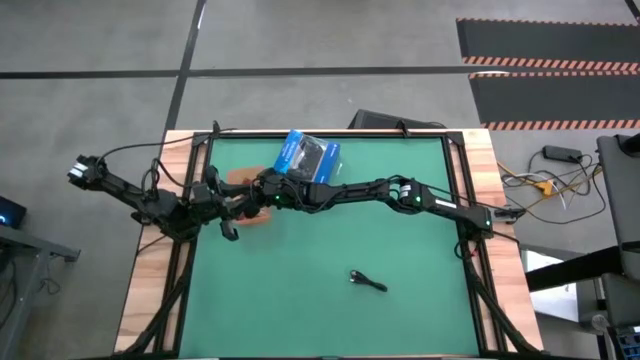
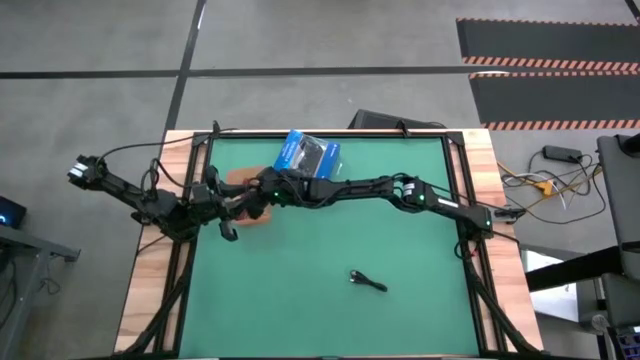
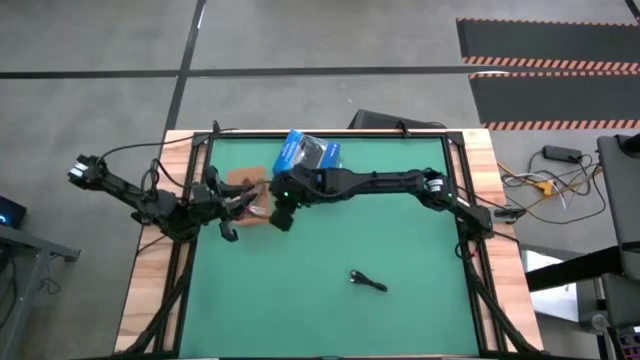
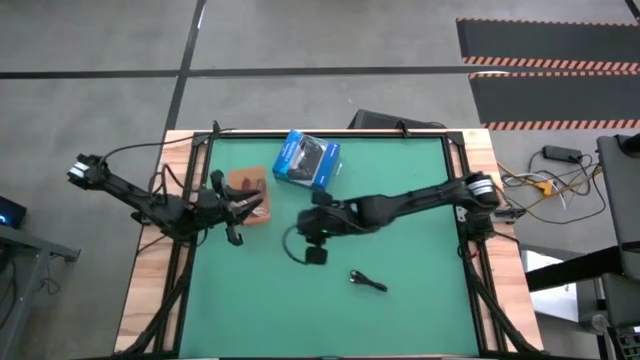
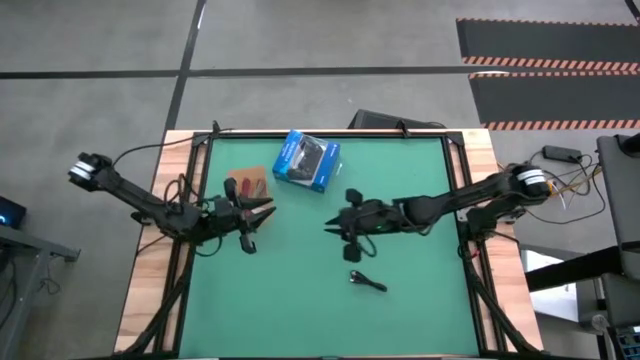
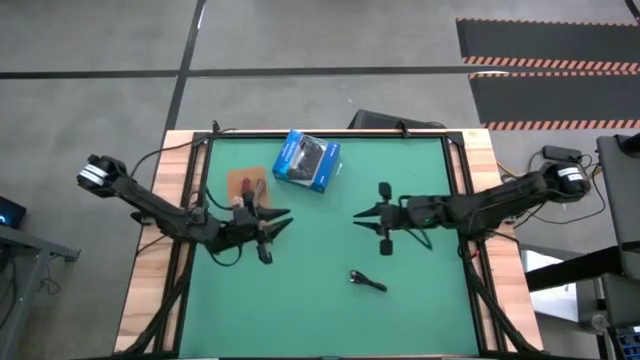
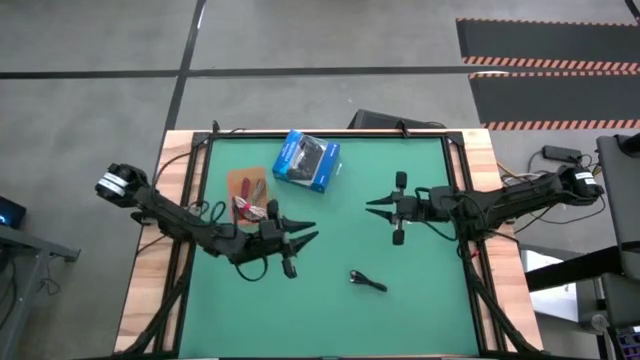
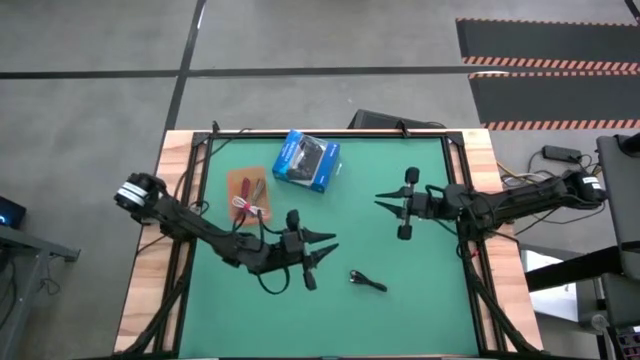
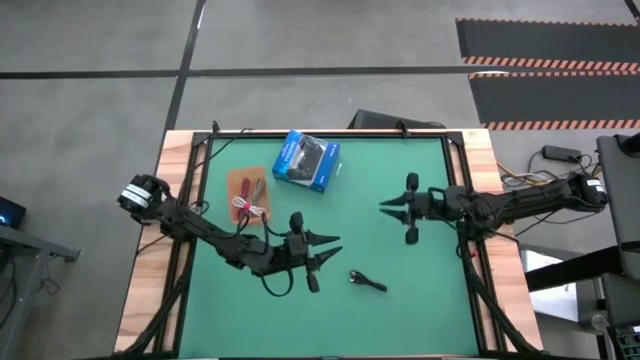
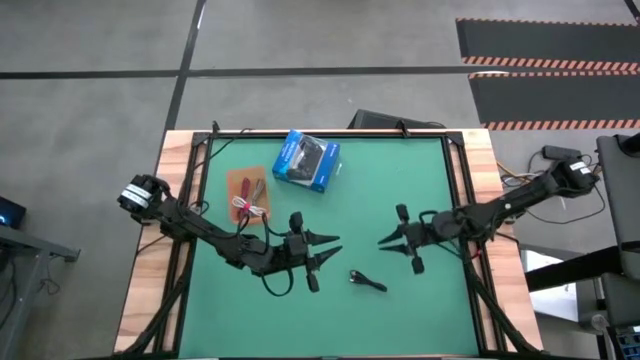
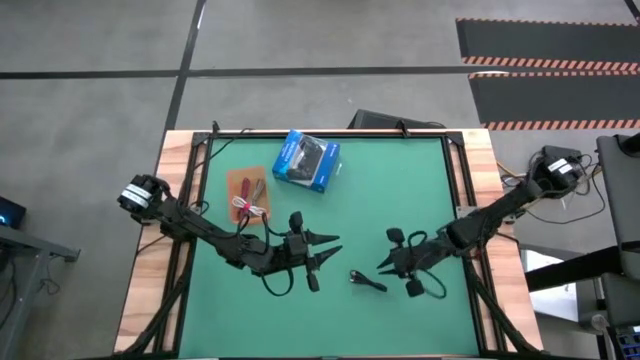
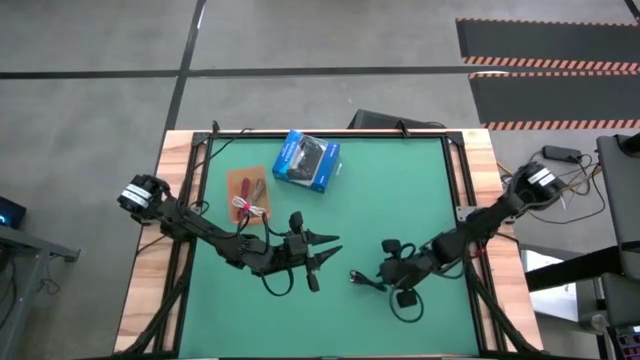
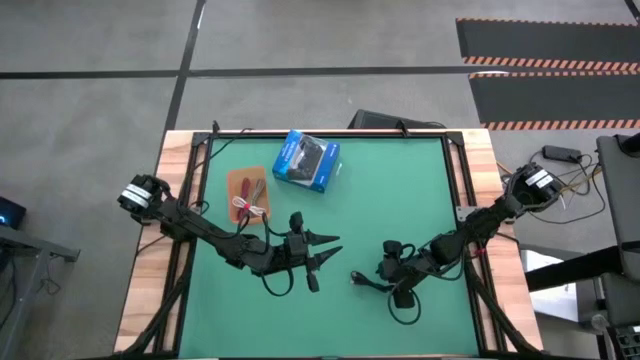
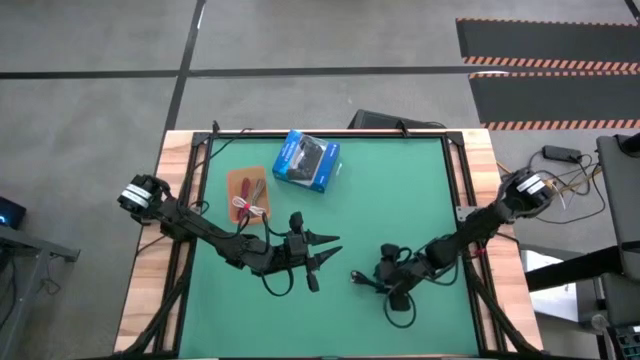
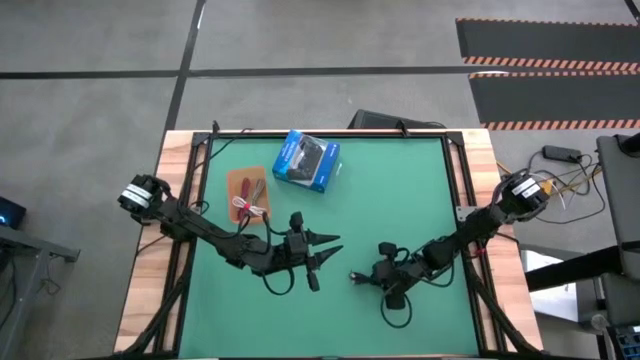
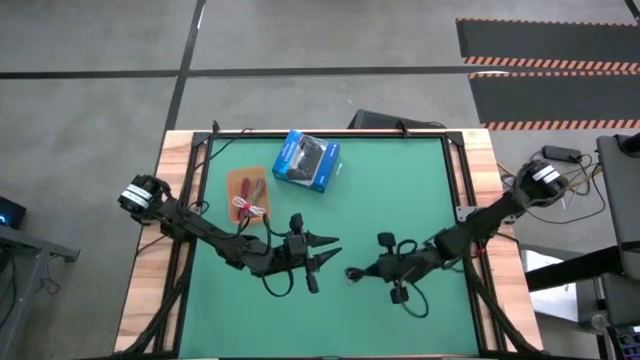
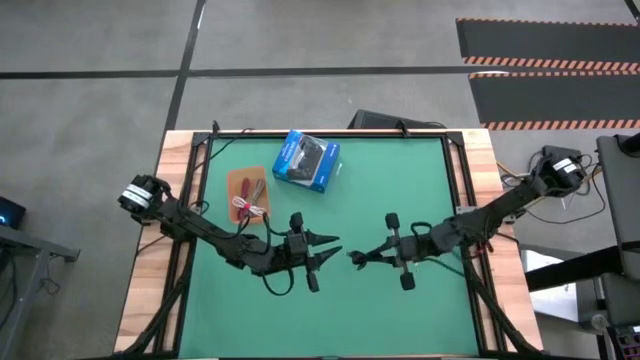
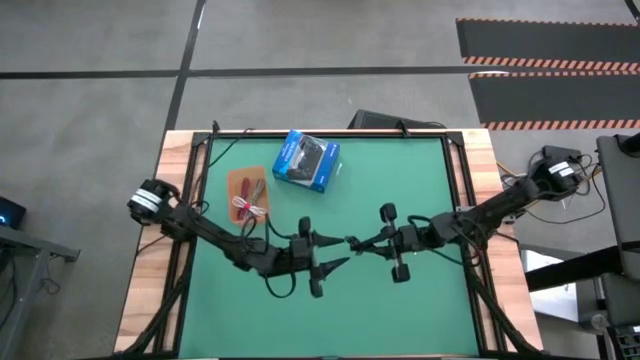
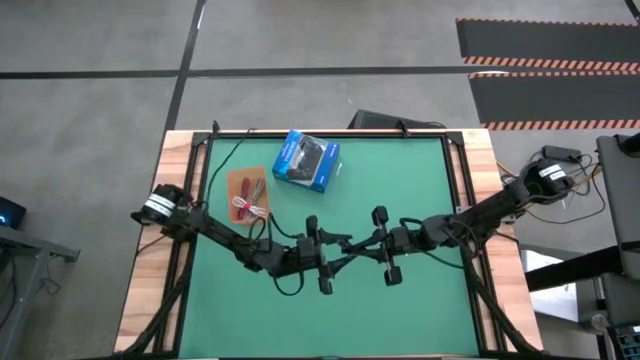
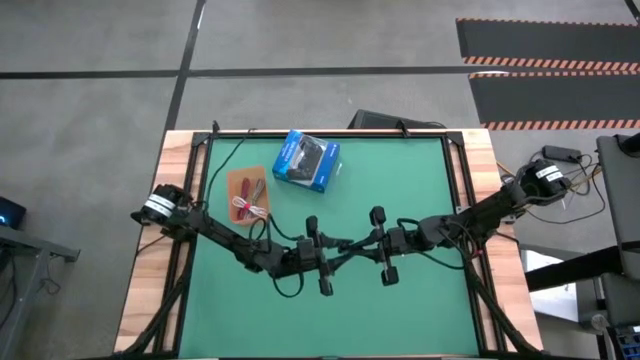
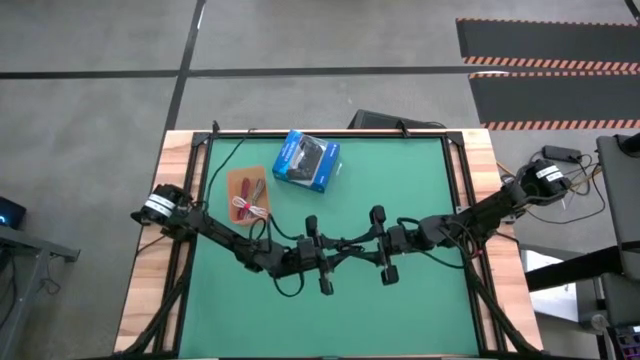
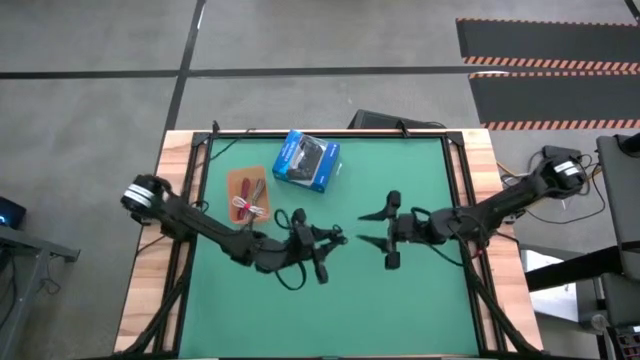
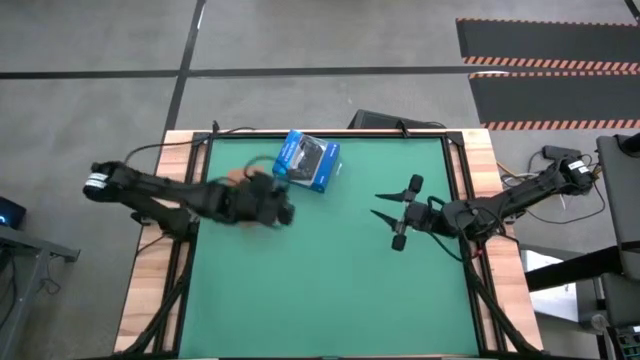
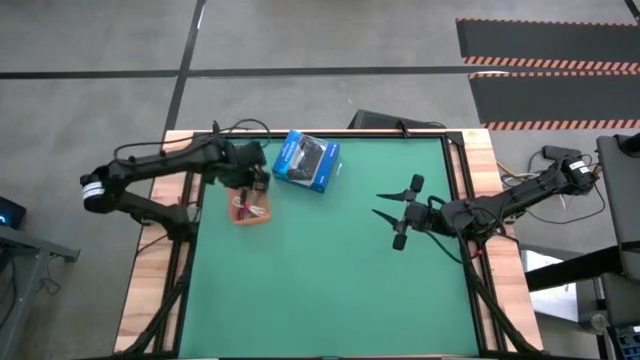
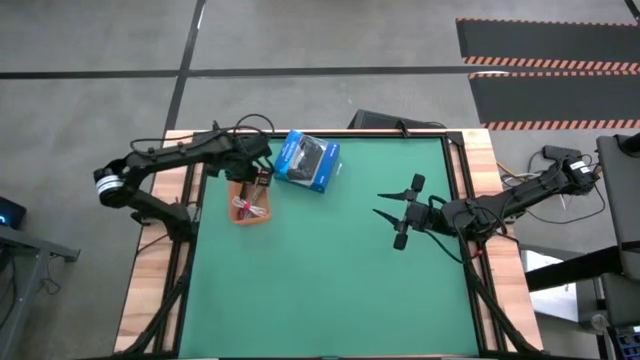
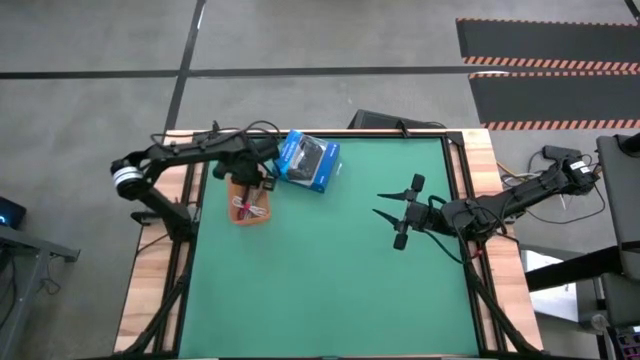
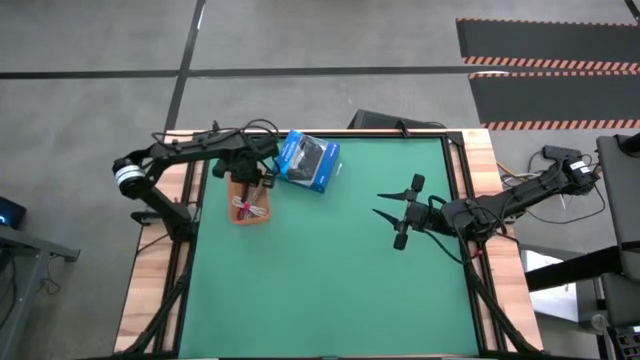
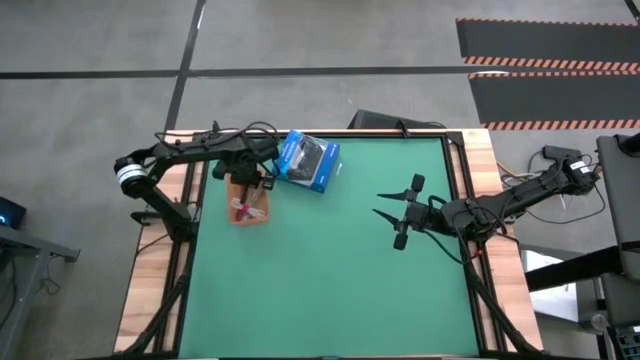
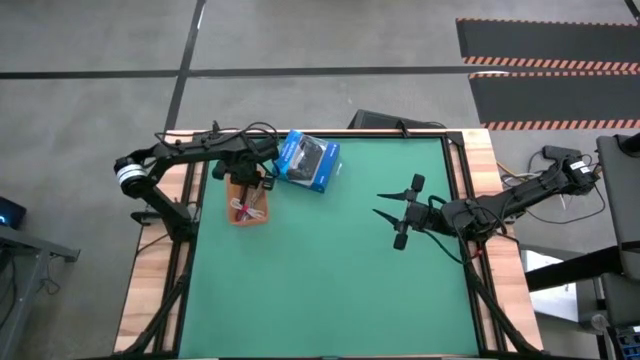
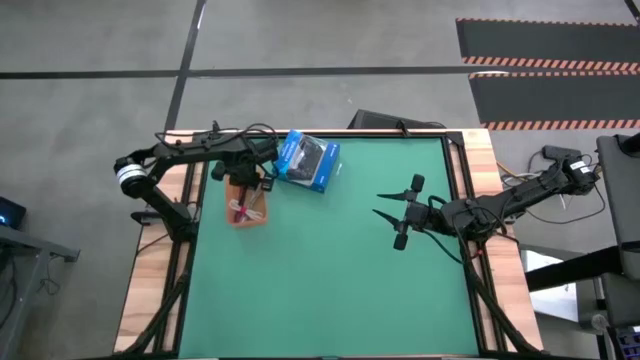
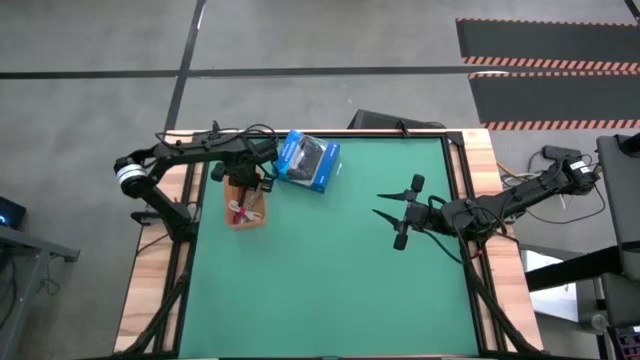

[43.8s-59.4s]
Task: Pick and place USB-C Cables
Put the black charger cable into the orange bin

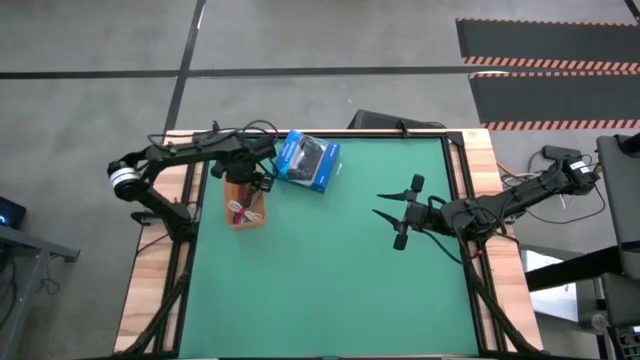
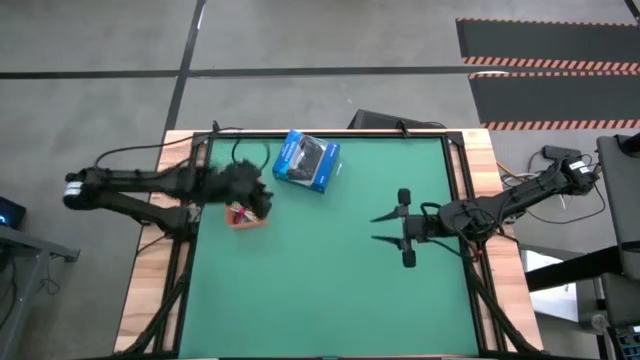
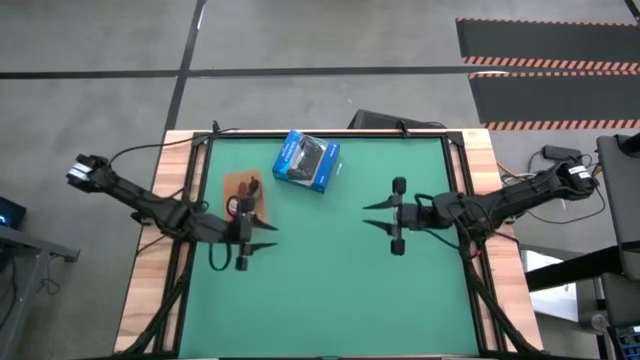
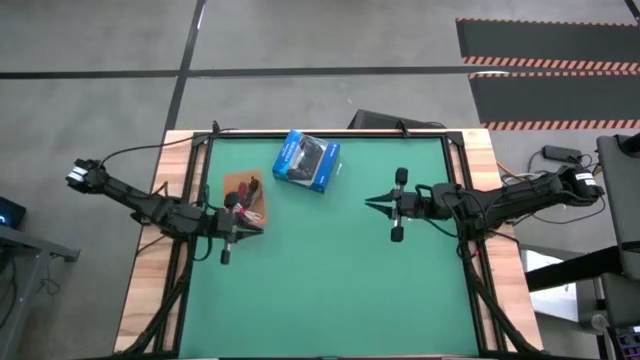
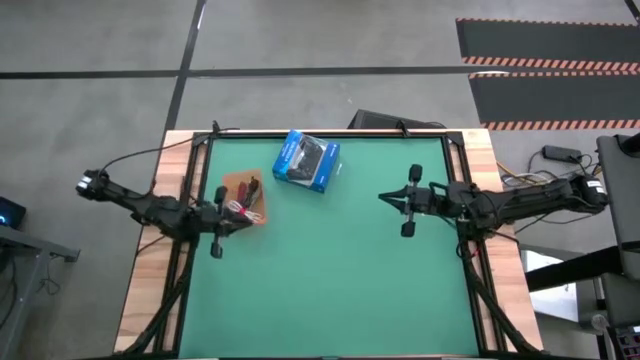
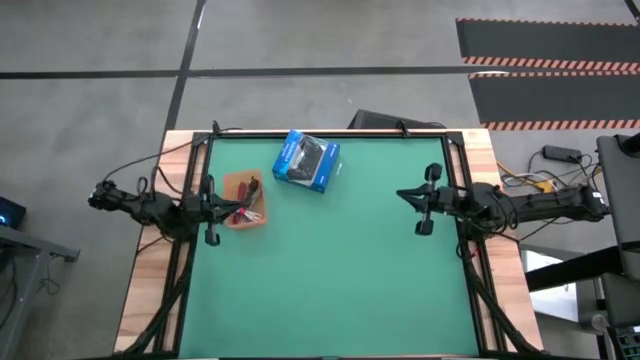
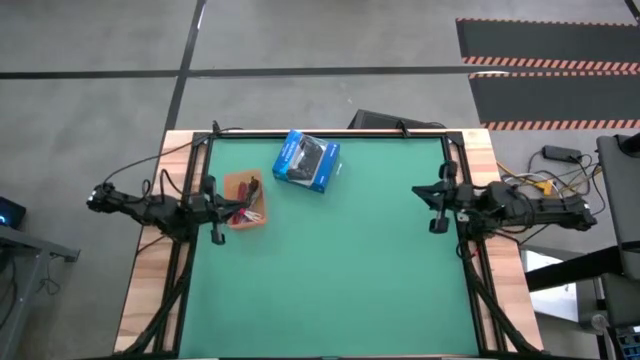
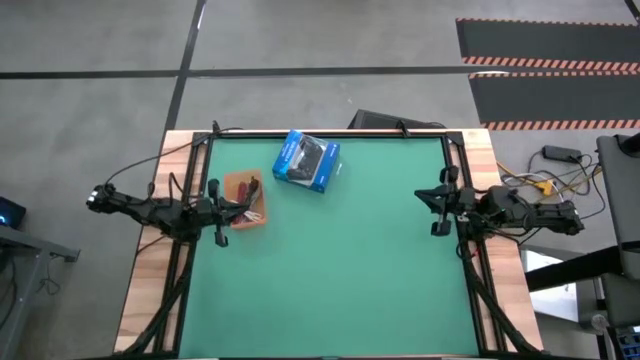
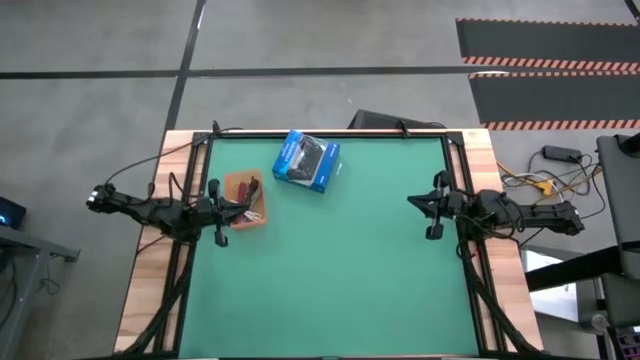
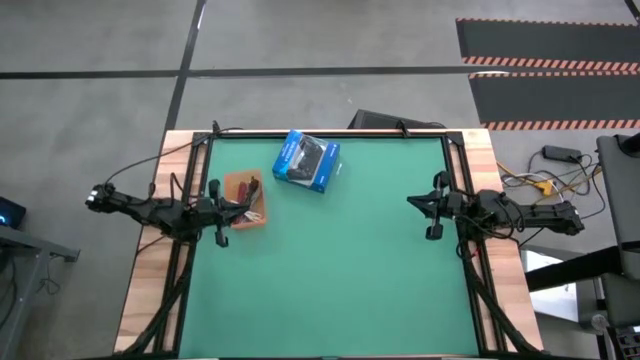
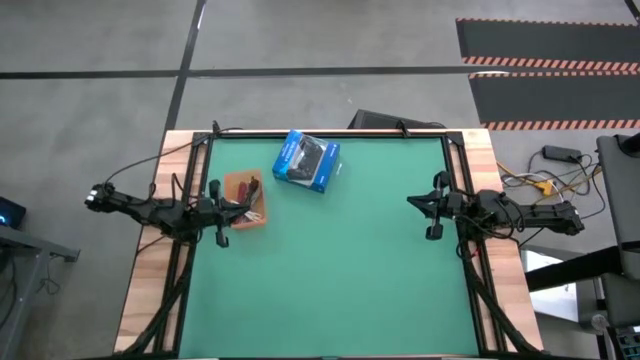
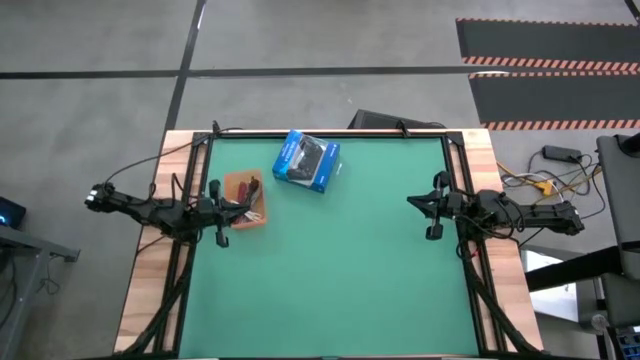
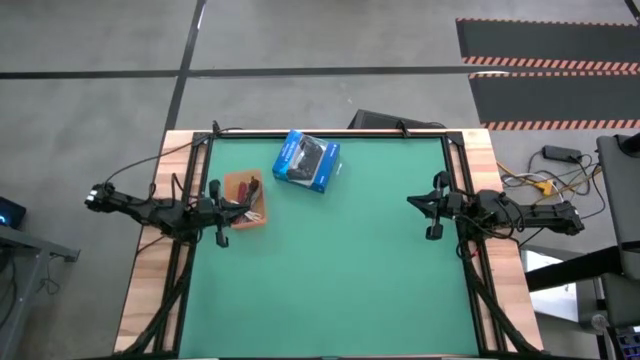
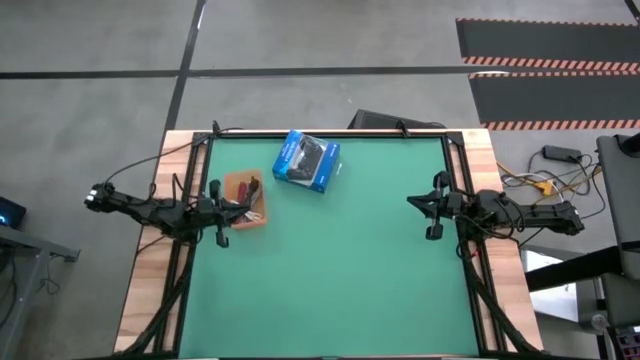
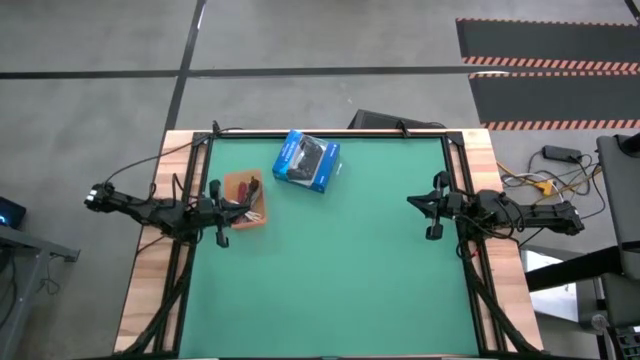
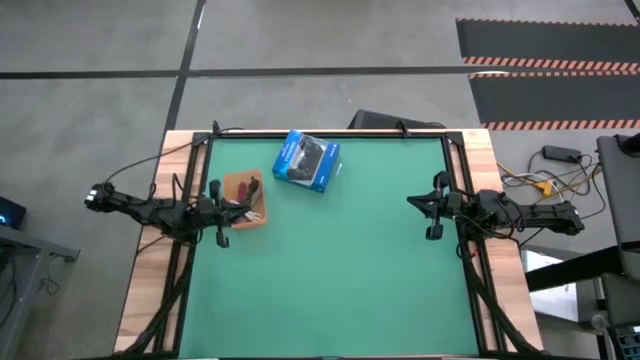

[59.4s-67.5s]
Return to Home Position
